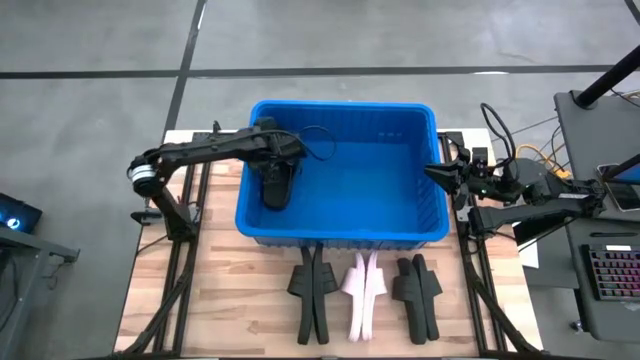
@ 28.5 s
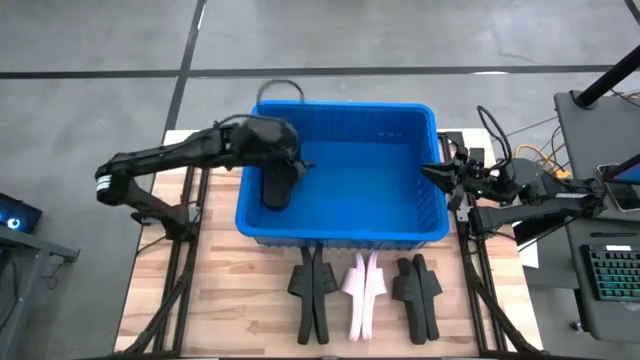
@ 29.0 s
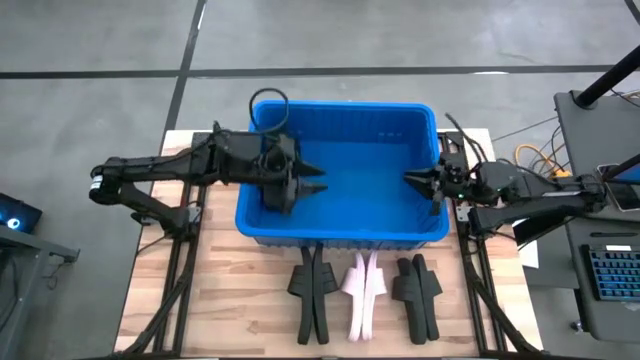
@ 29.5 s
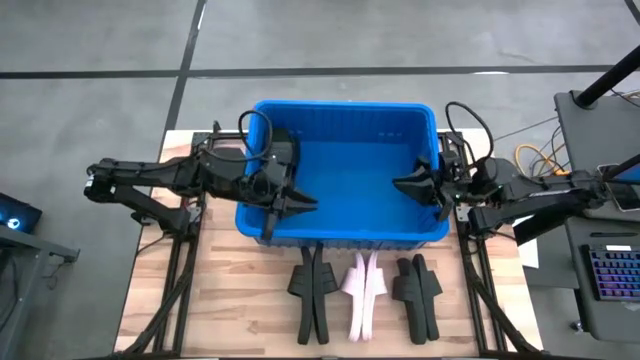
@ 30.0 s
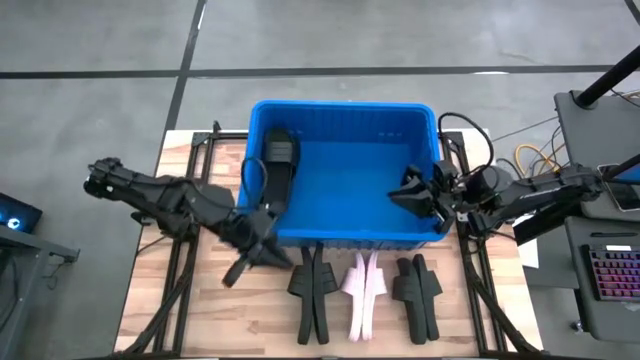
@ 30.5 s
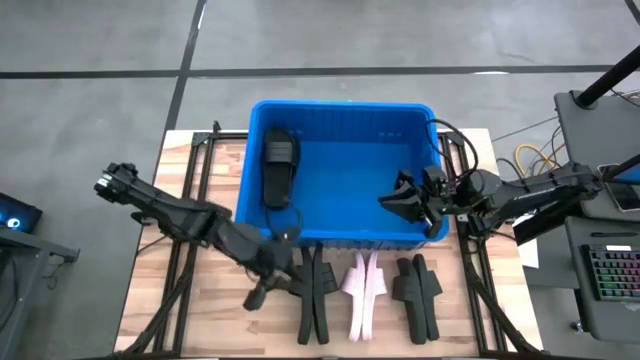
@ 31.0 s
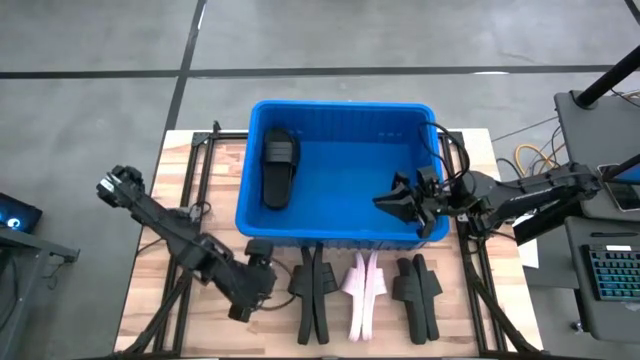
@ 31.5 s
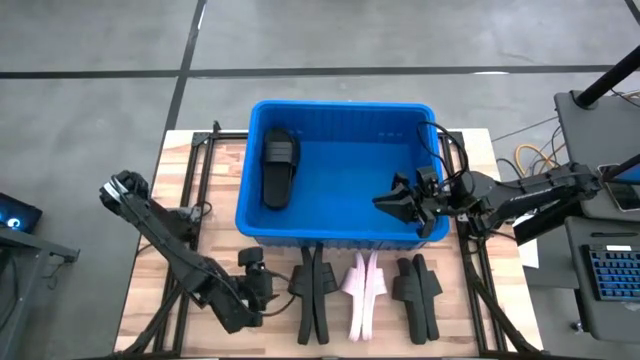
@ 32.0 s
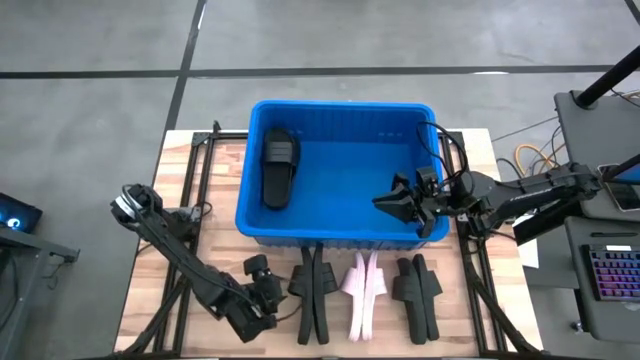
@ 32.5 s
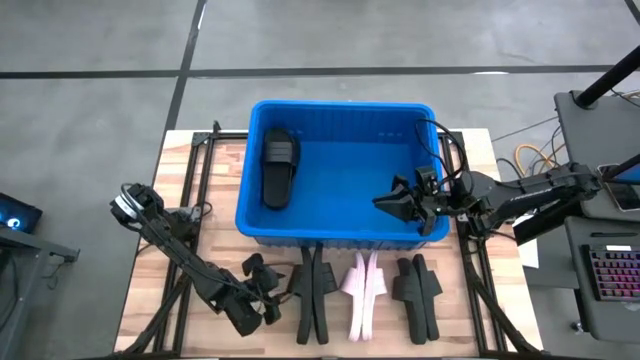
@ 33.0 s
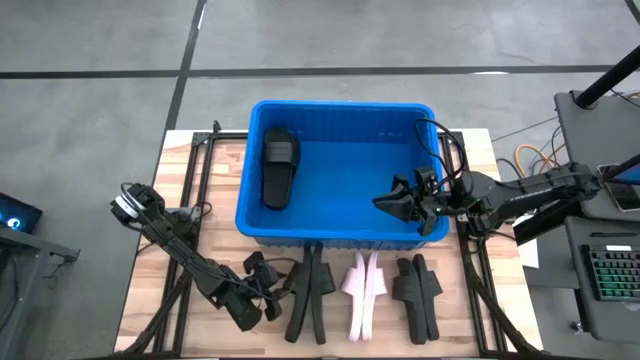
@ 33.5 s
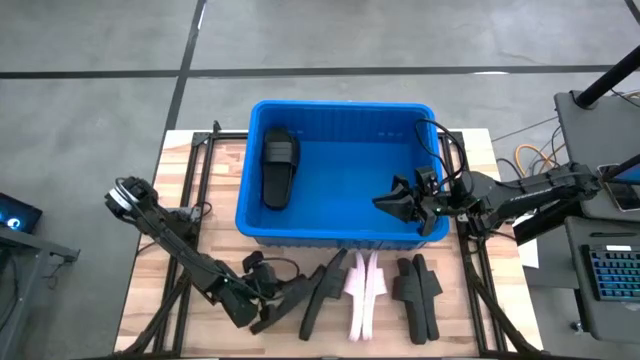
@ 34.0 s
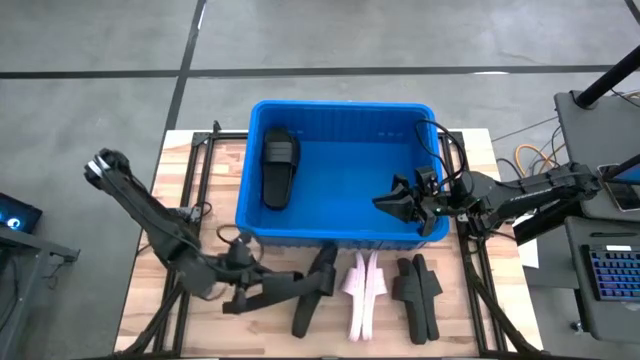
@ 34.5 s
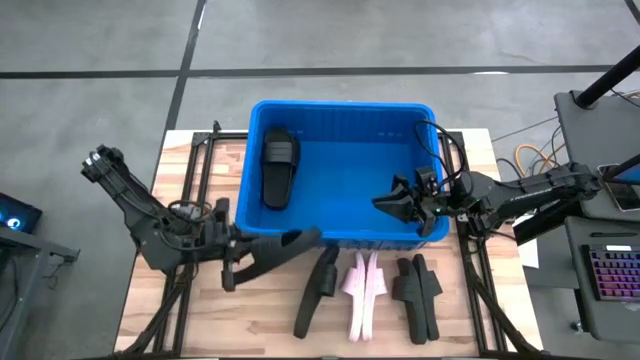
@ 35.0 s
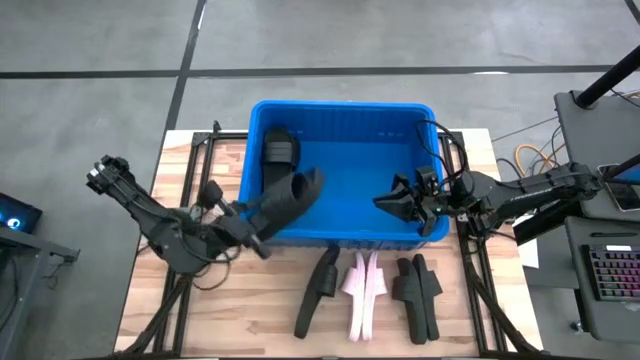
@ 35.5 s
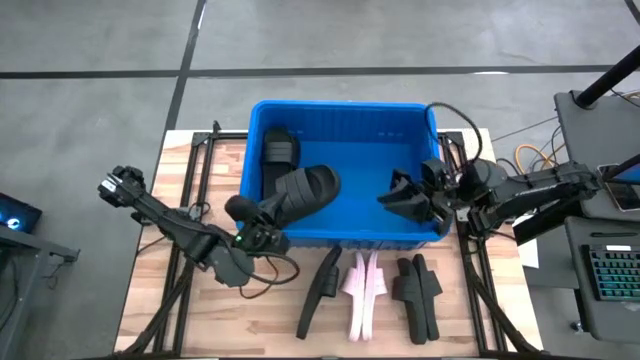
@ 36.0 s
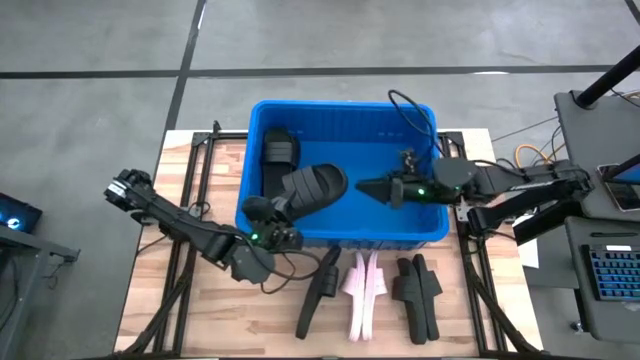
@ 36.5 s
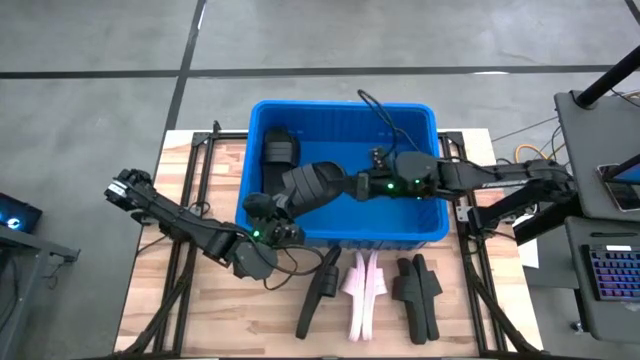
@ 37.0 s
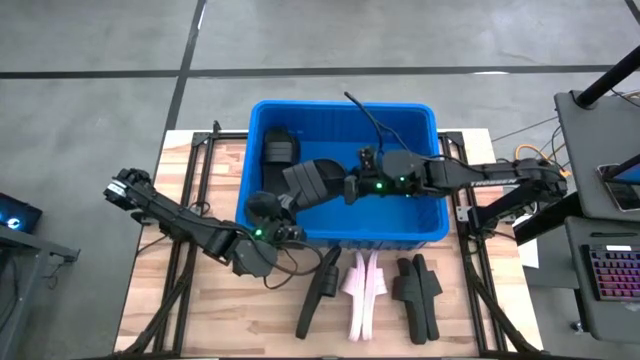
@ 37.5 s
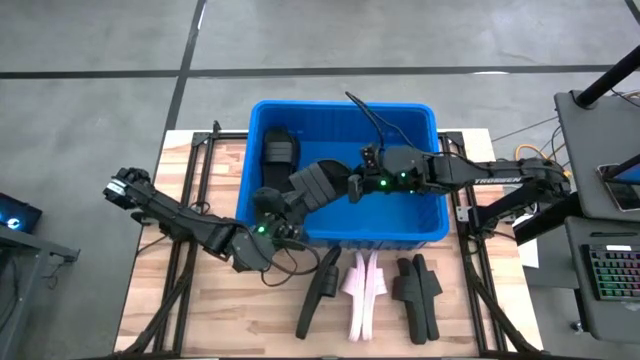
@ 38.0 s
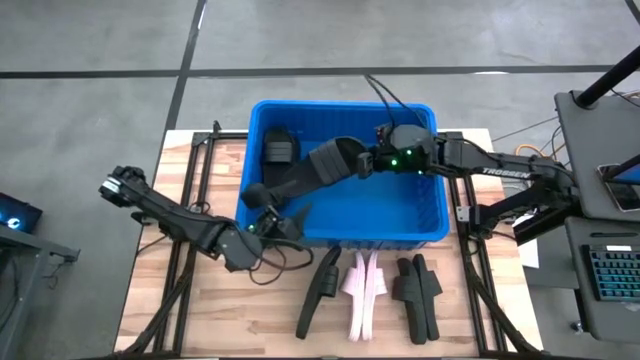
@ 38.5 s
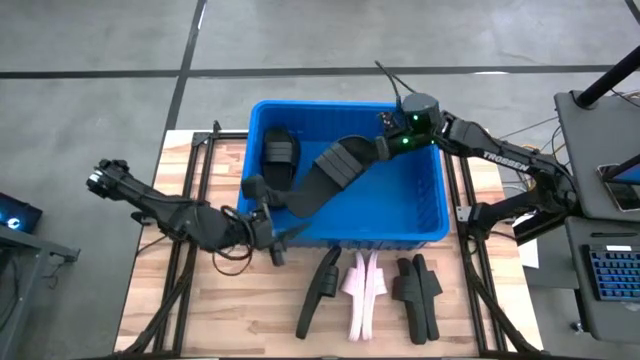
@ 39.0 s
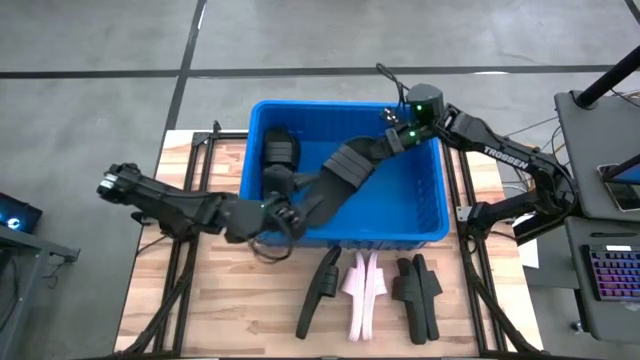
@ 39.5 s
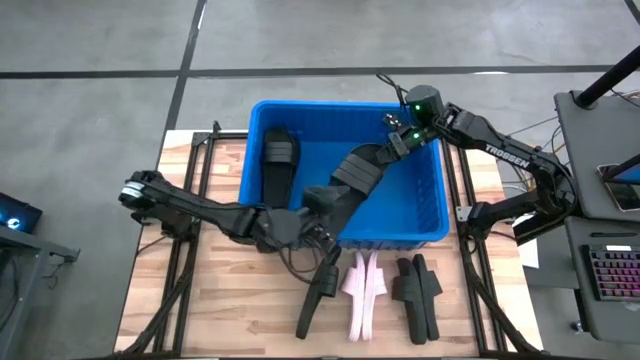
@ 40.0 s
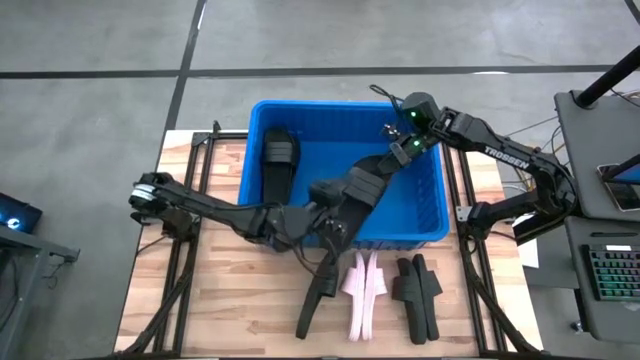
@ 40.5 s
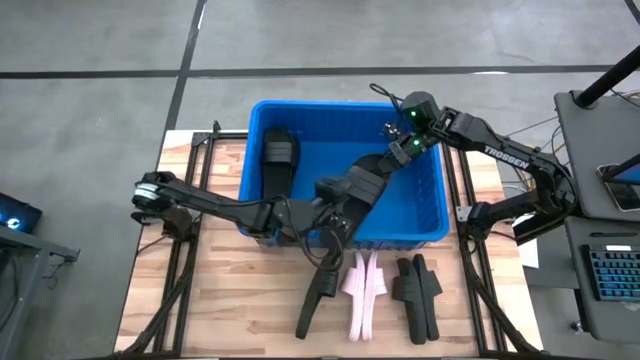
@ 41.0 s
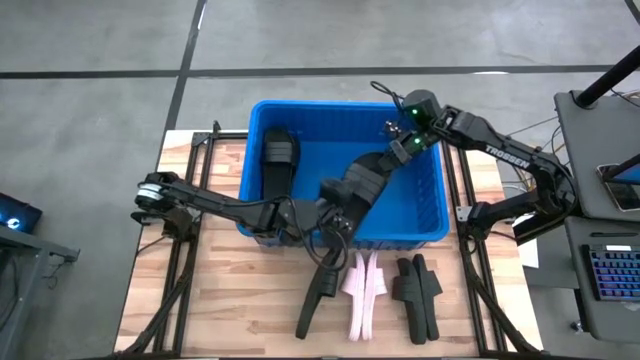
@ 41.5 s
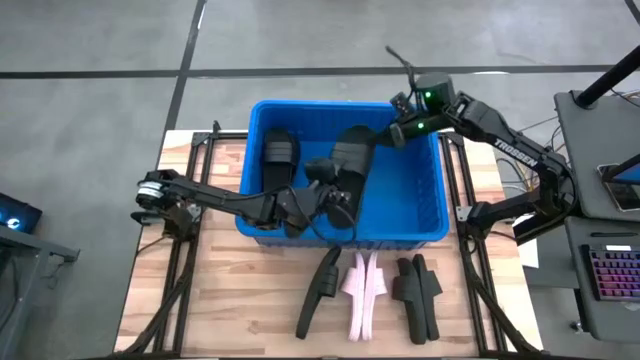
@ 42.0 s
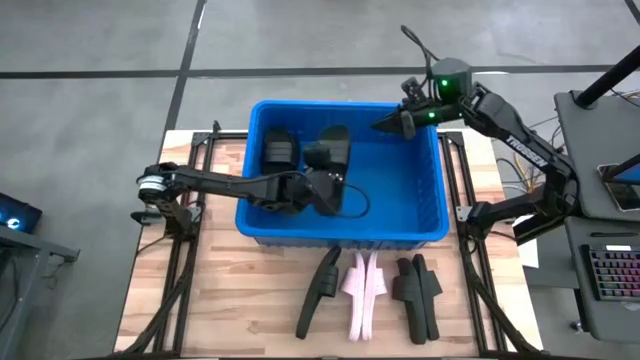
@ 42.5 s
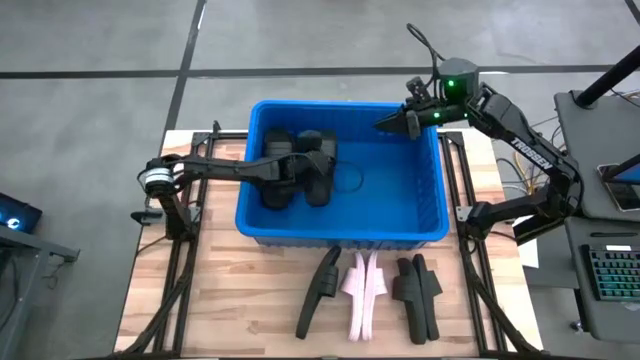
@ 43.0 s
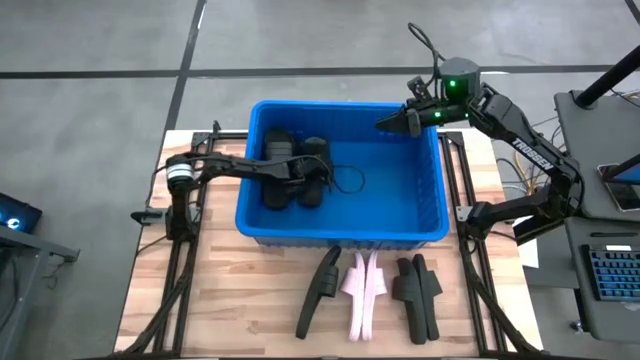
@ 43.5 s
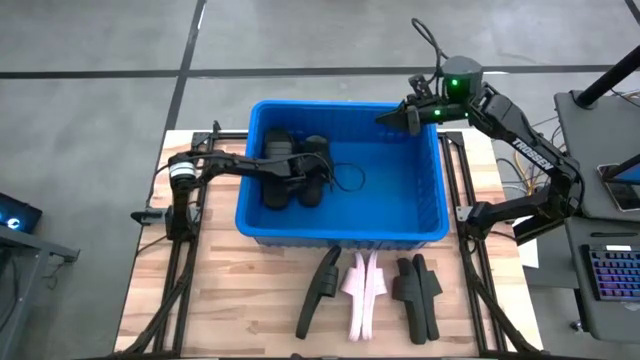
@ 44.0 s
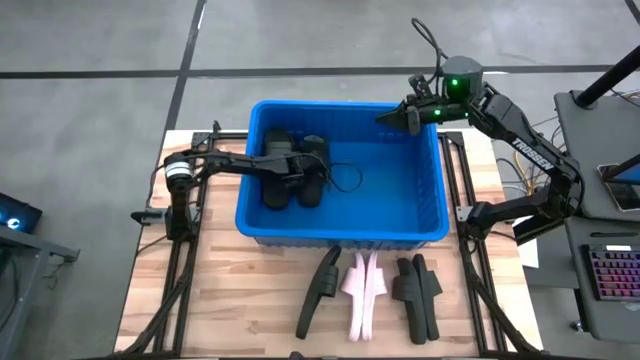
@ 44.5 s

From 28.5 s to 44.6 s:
Task: Pick and place slides into bin
Put the black slides into the blue bin

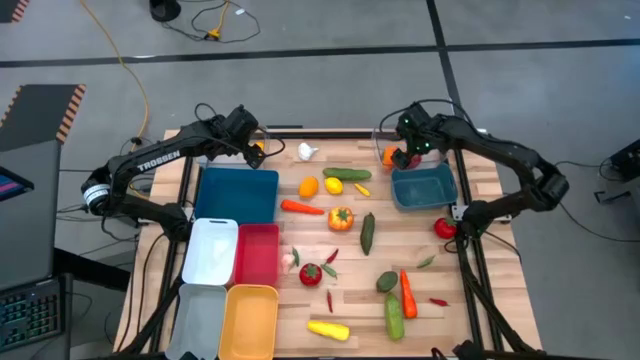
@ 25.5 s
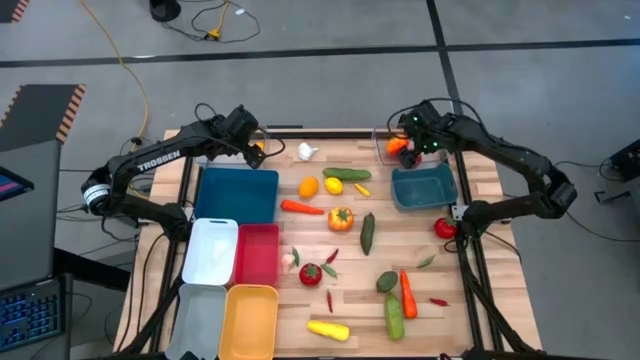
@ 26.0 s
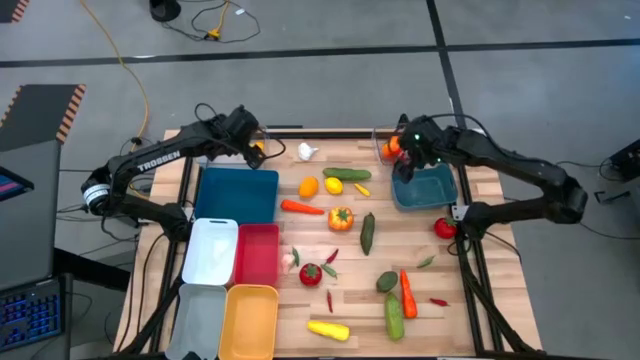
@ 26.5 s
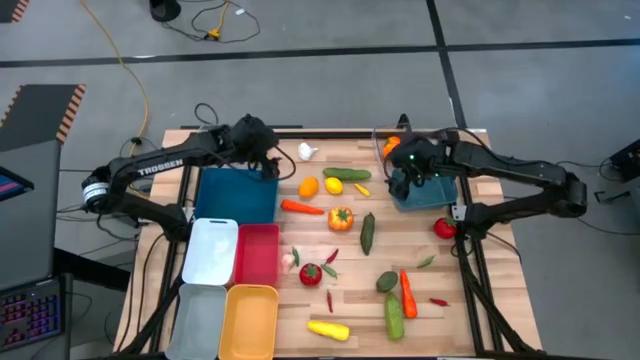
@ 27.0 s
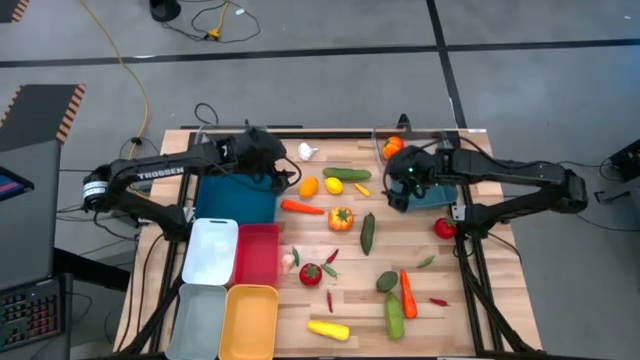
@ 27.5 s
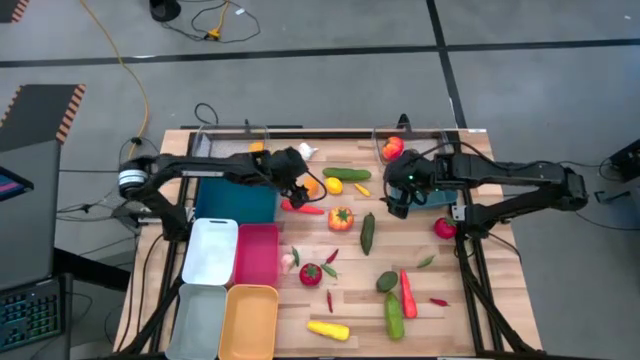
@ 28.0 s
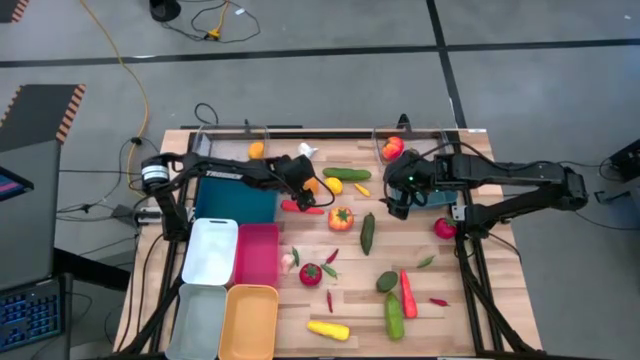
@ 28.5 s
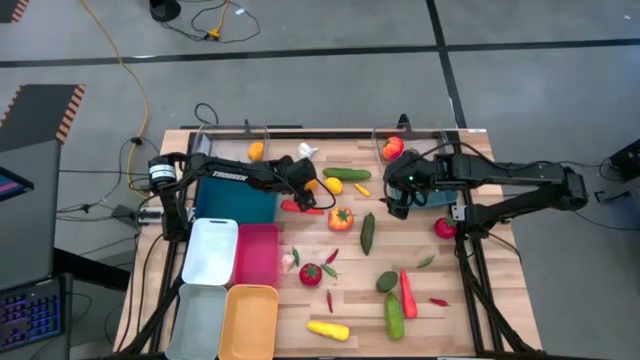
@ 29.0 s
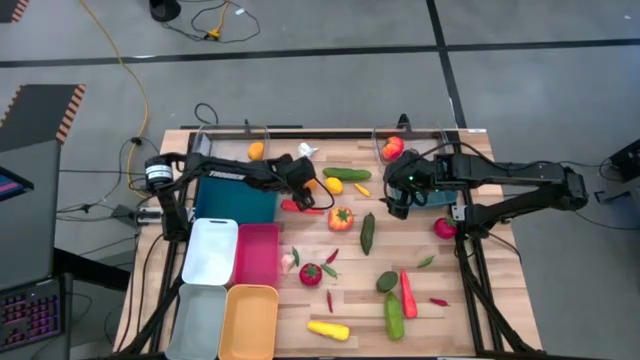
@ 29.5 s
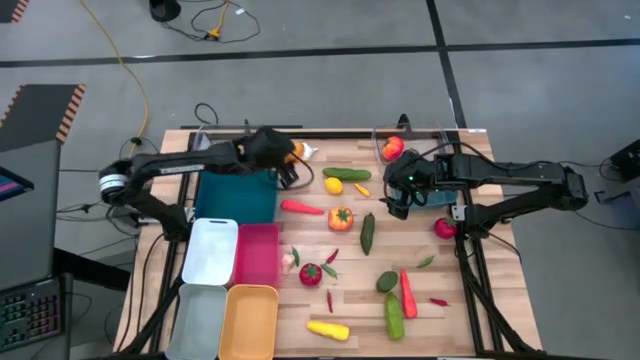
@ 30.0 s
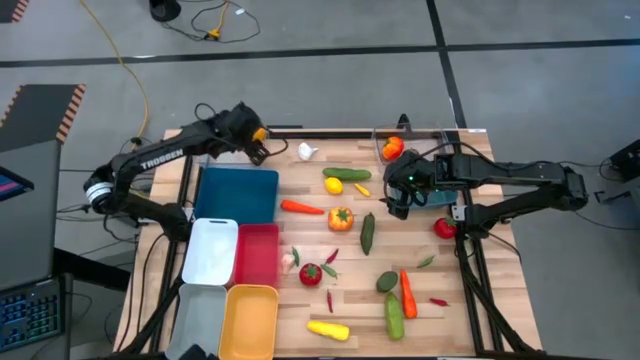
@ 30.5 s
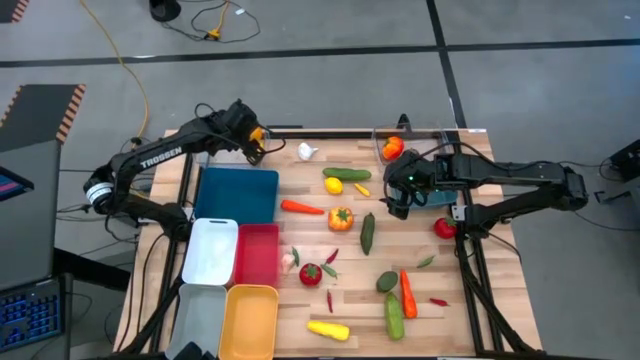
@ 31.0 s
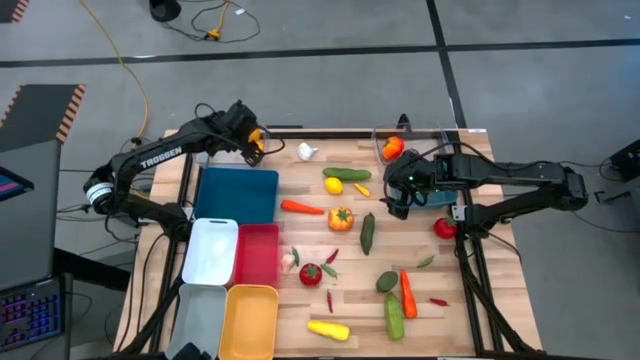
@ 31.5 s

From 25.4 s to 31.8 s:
Task: Sort produce into baskets
Put the right yellow lemon into the left transparent bin
